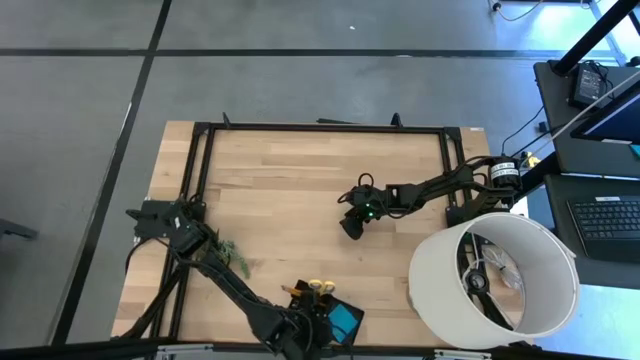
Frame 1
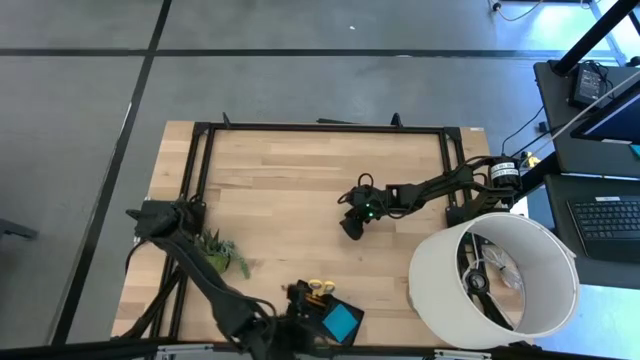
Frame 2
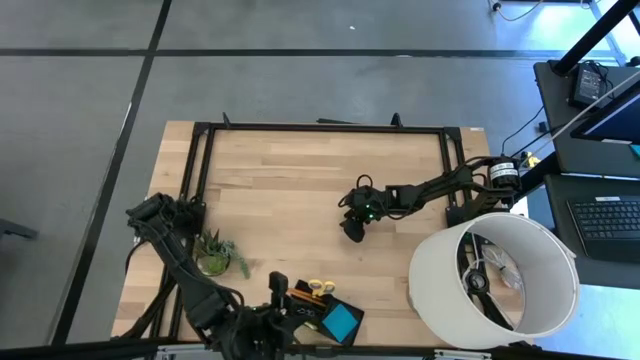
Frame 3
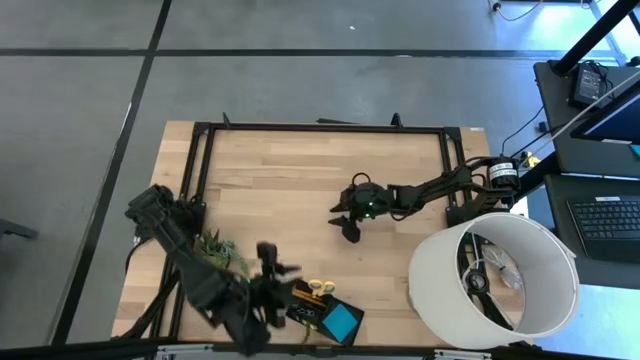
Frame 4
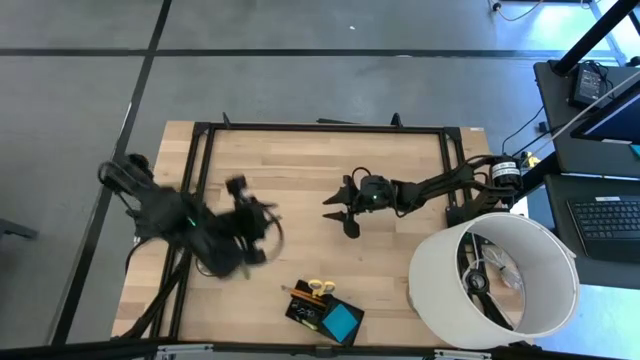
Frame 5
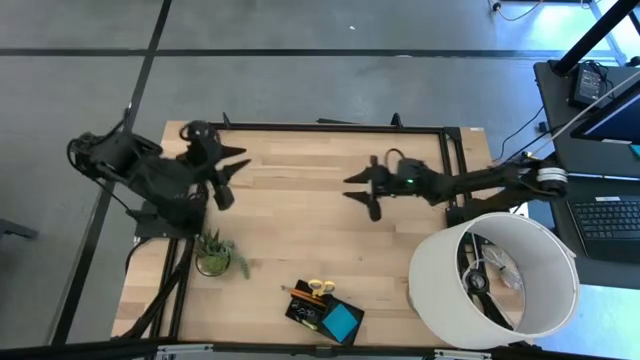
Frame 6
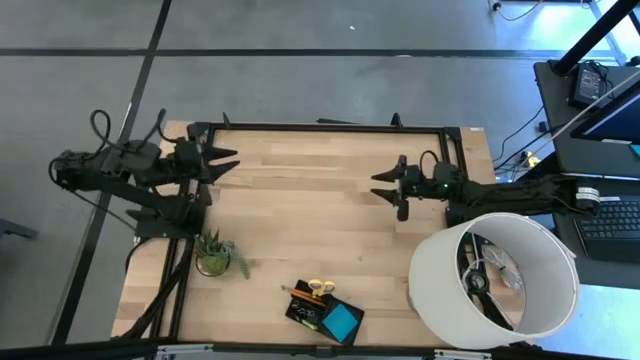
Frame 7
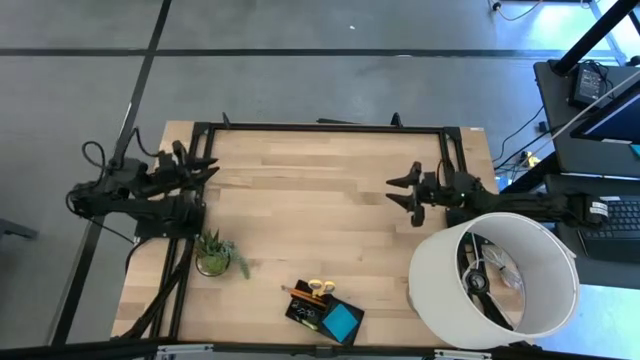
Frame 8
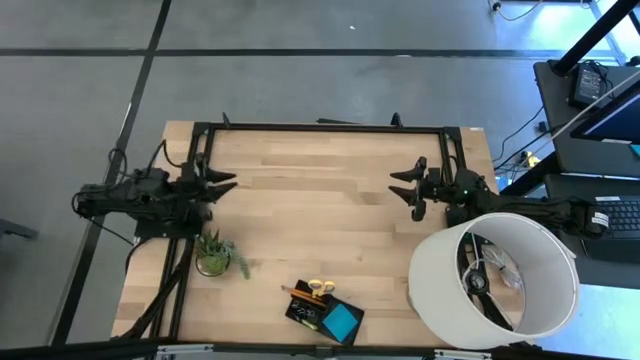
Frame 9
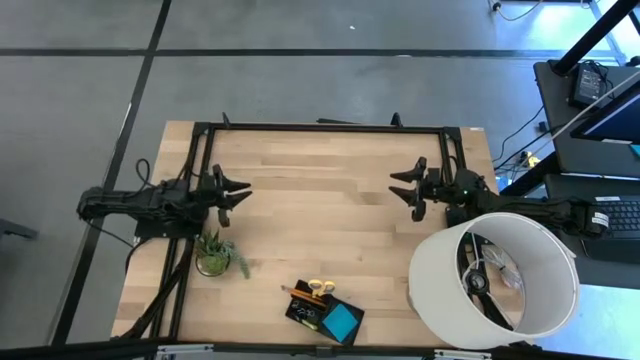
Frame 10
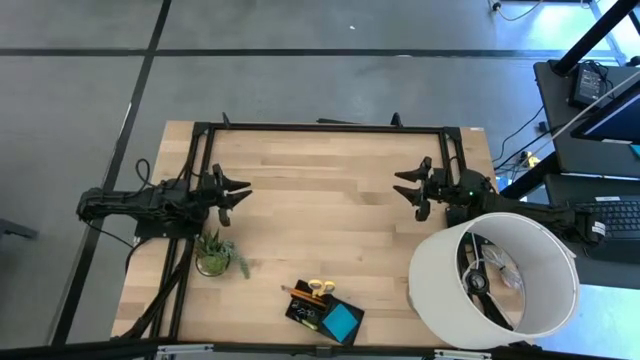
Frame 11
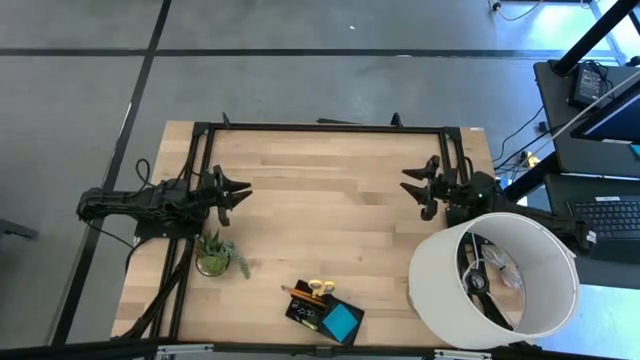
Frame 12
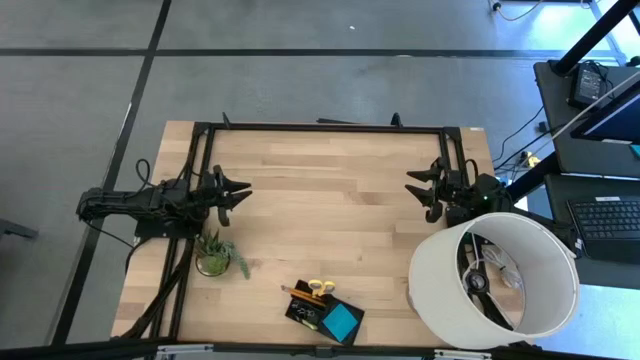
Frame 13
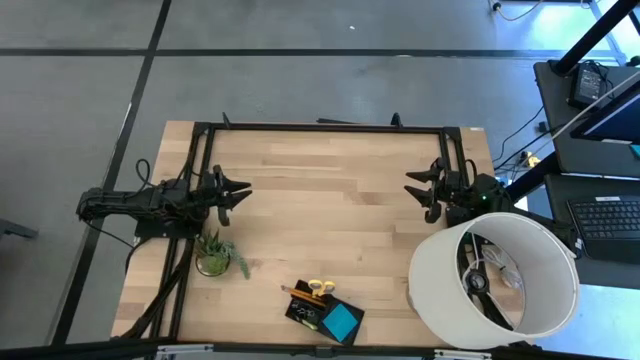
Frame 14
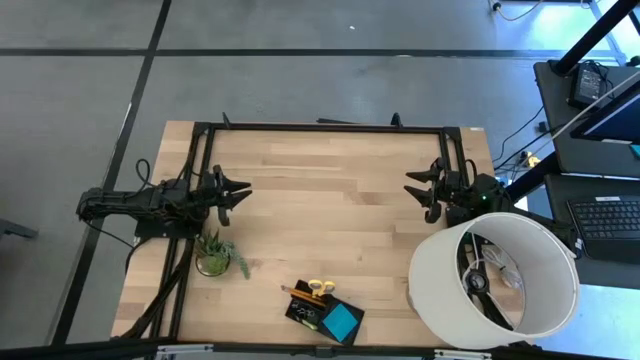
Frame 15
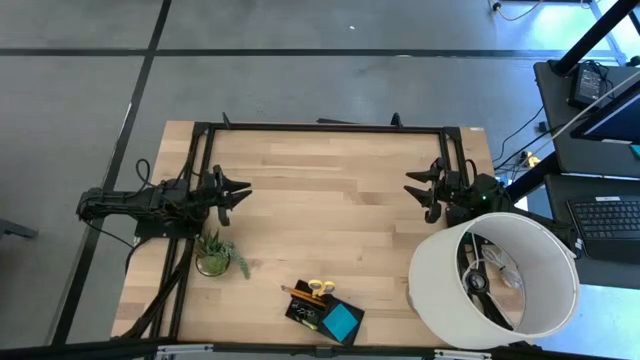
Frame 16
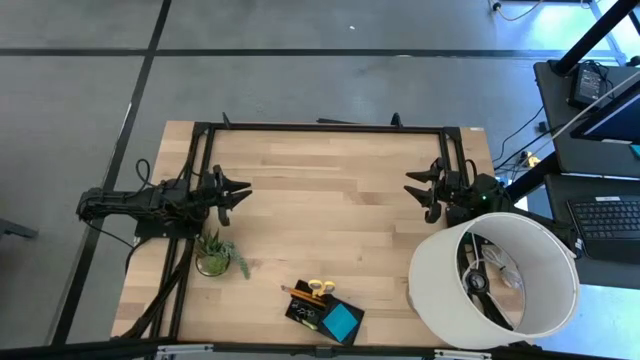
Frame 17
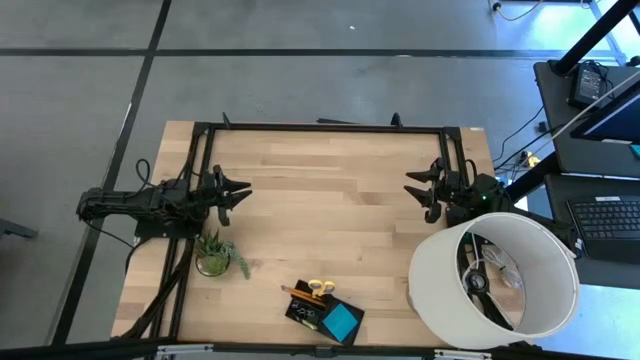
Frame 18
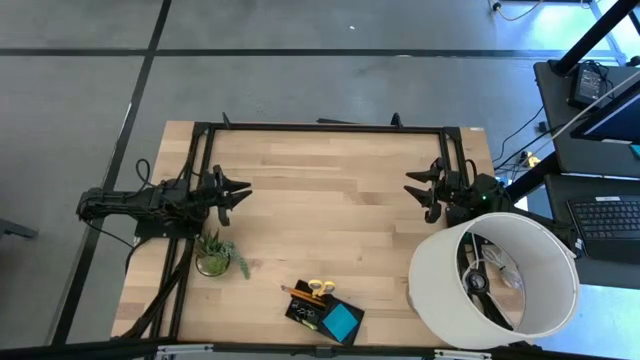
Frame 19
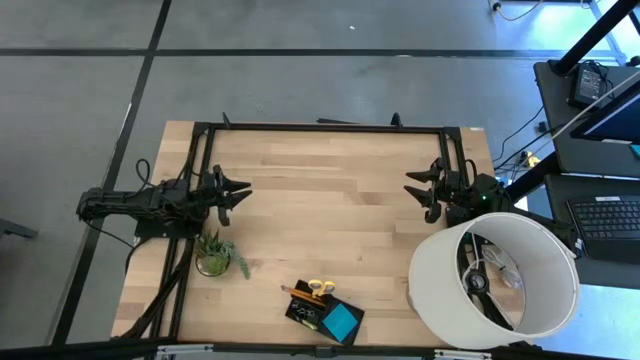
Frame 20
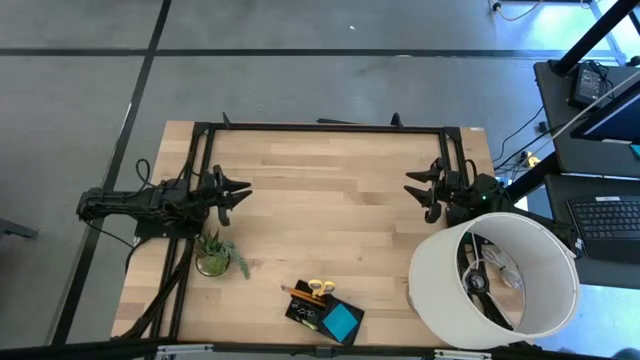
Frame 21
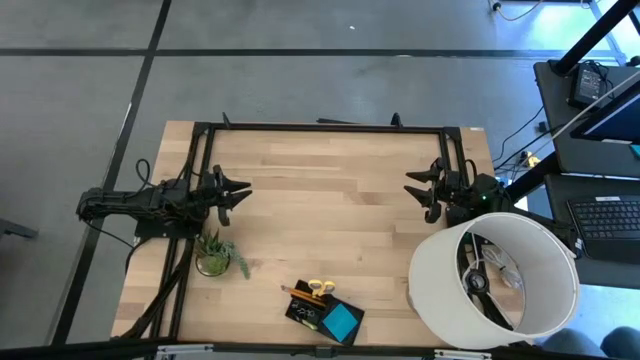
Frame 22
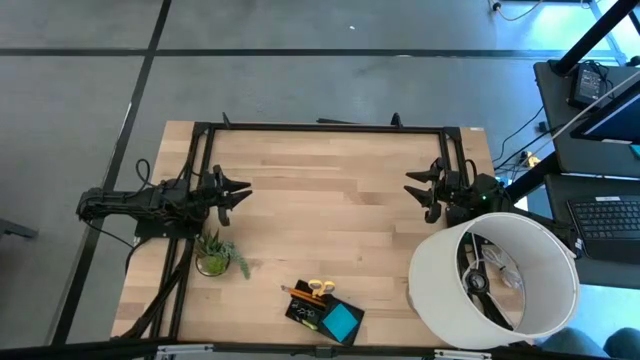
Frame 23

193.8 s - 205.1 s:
Task: Pick and place office supplies into organizer
Return to Home Position

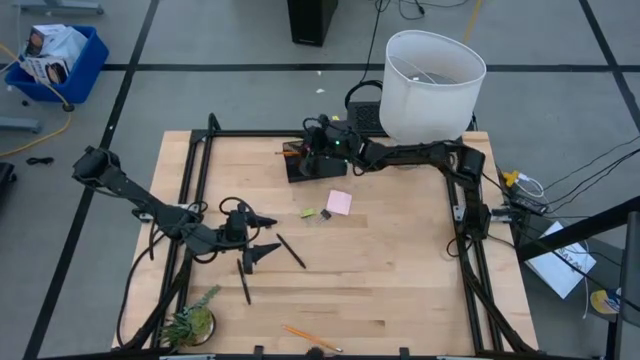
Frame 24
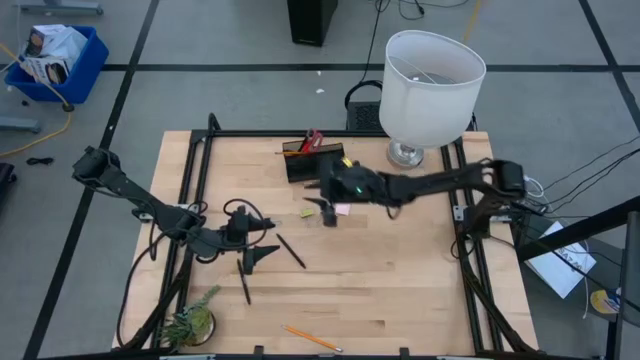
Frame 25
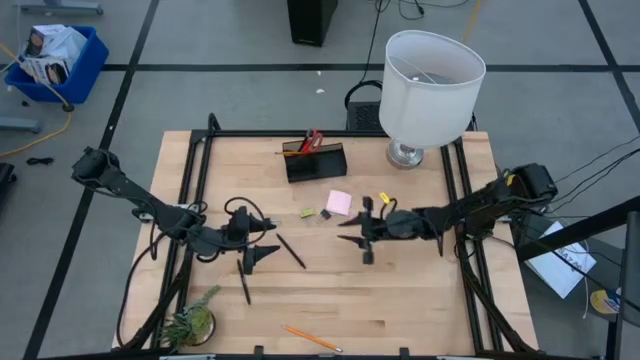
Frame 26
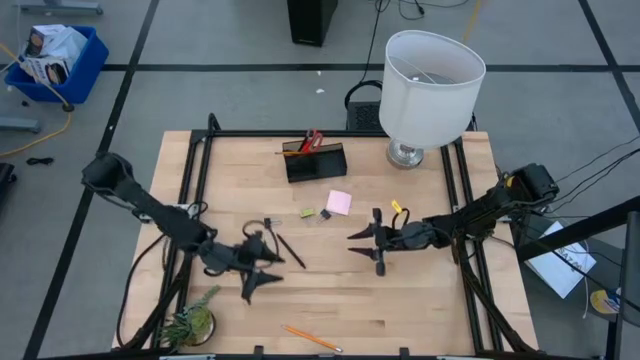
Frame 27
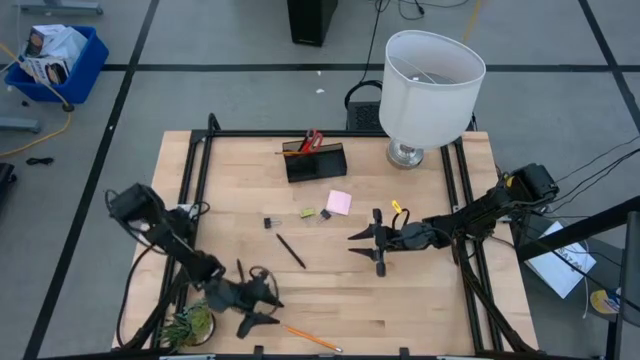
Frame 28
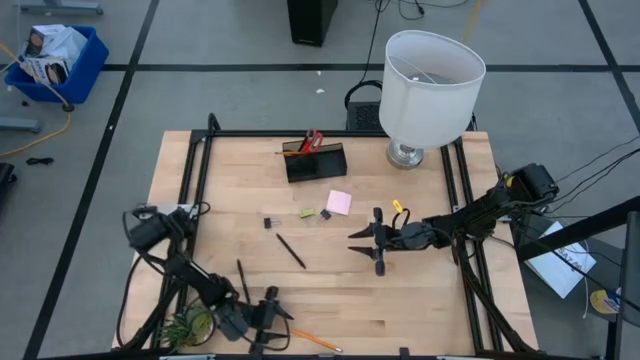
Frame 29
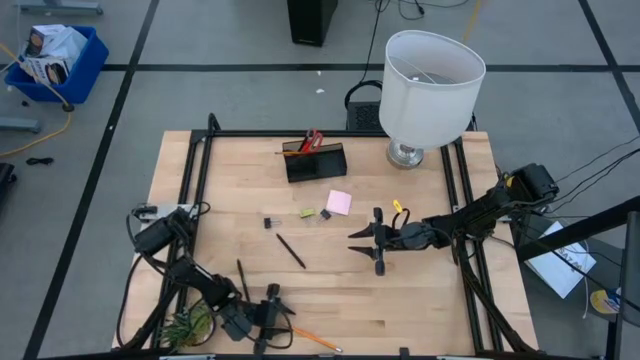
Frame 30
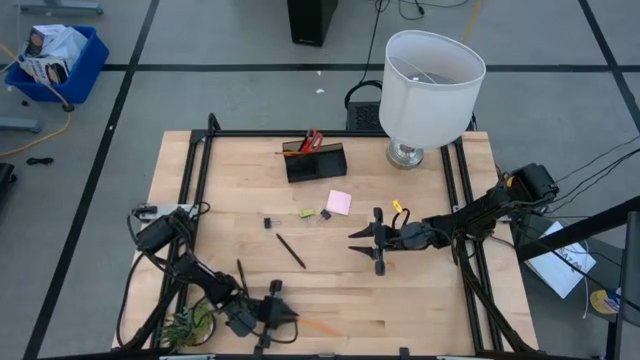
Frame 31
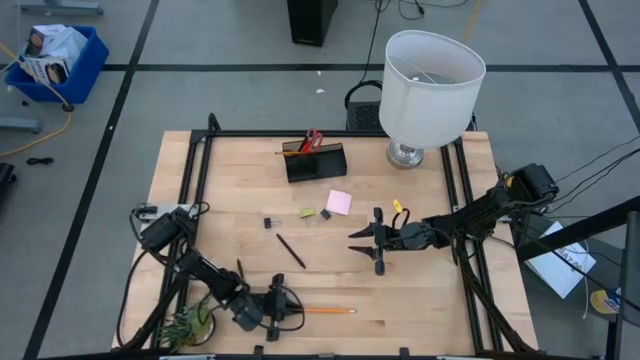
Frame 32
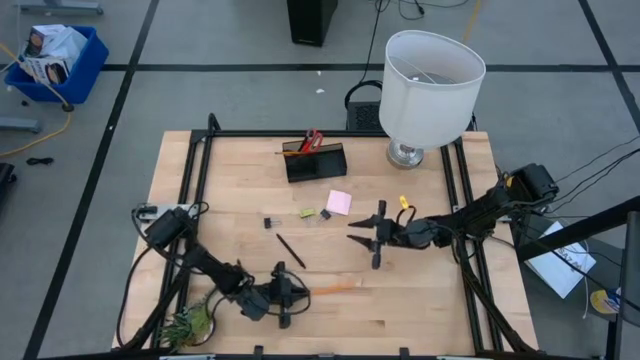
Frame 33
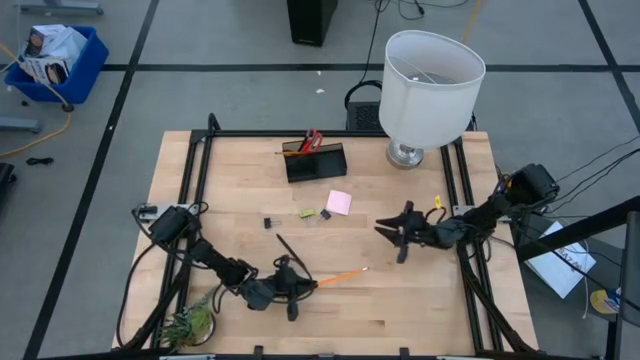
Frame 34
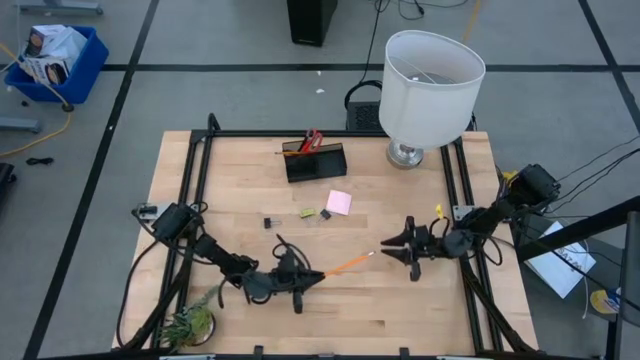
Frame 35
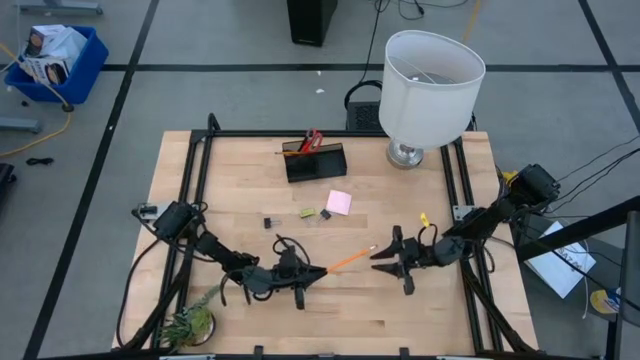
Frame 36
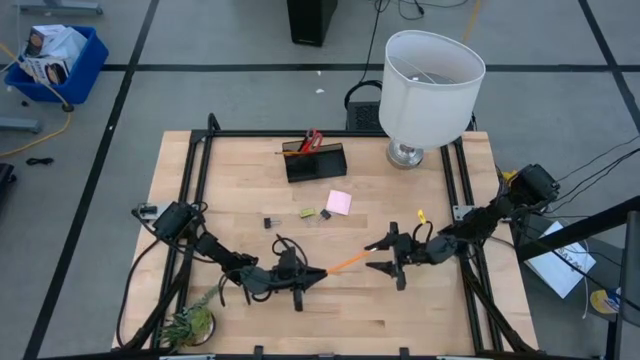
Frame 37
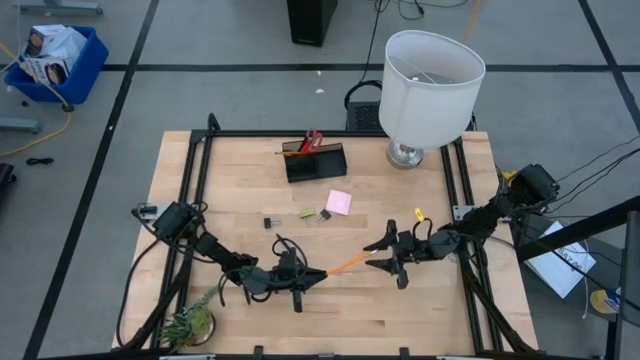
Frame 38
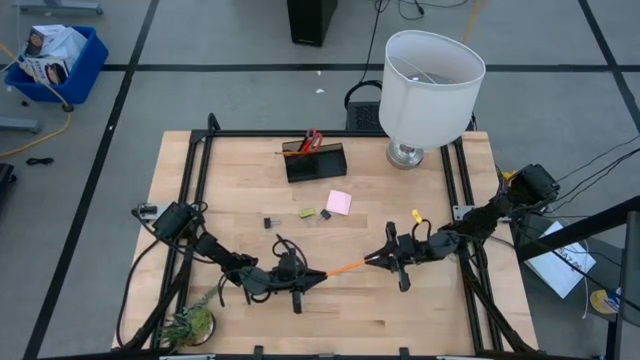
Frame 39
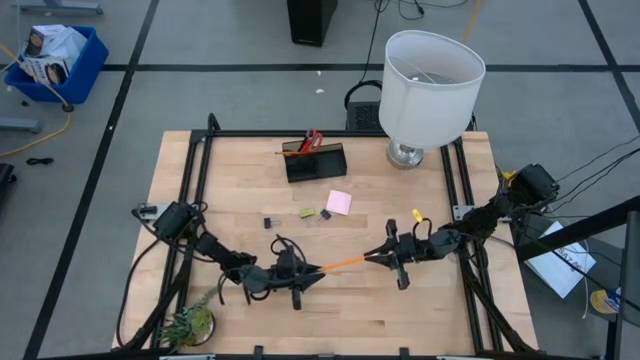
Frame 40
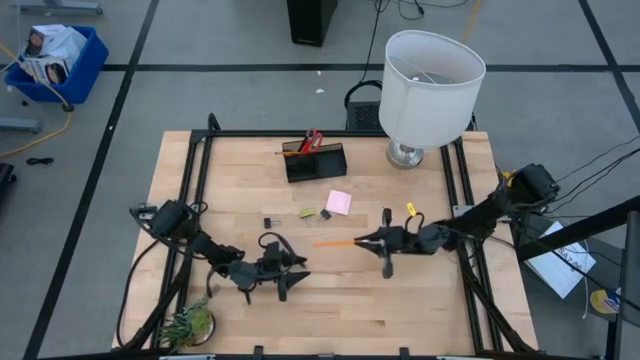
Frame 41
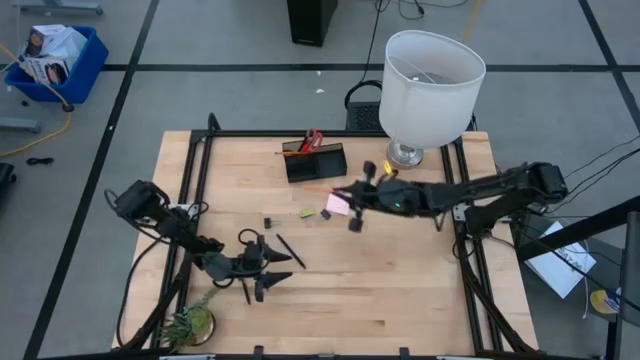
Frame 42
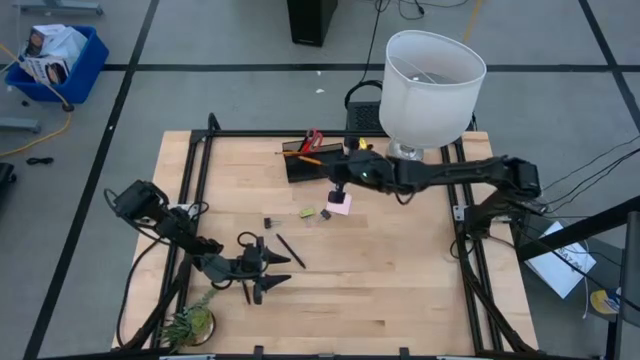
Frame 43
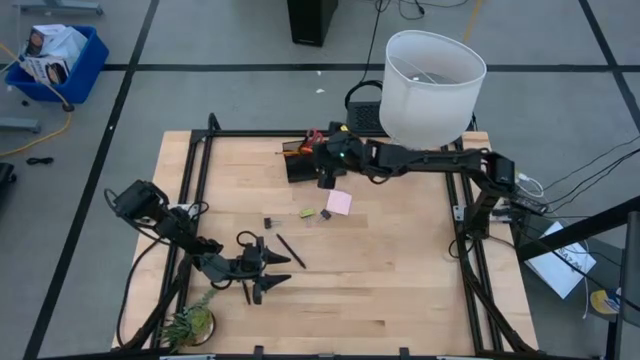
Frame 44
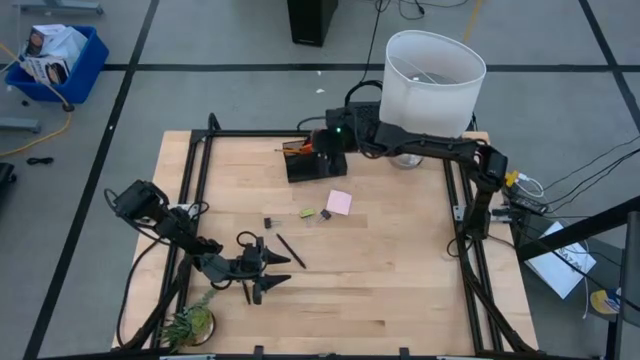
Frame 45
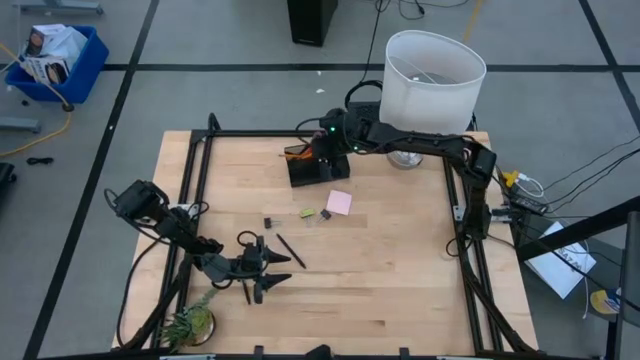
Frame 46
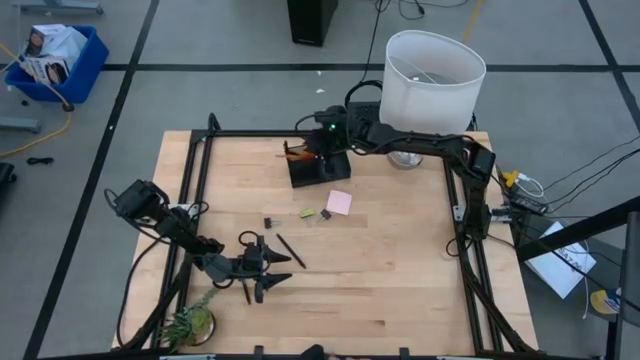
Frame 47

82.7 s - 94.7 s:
Task: Pick and place office supplies into organizer
Put the yellow pencil into the black desk organizer
